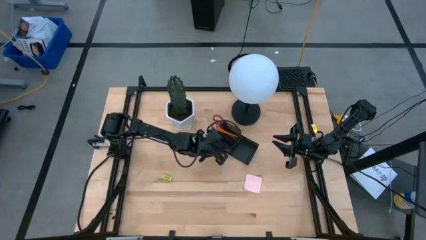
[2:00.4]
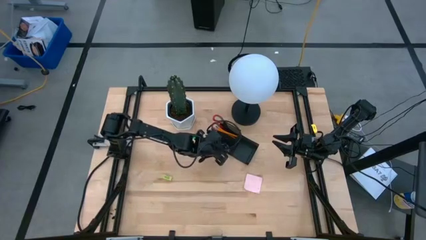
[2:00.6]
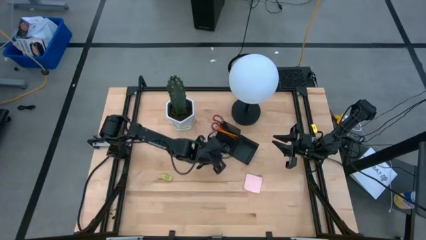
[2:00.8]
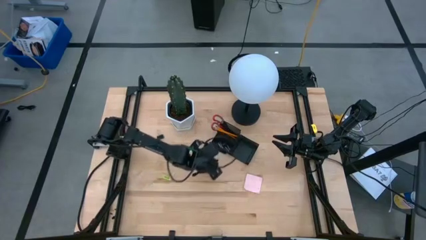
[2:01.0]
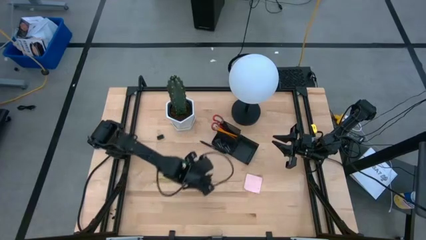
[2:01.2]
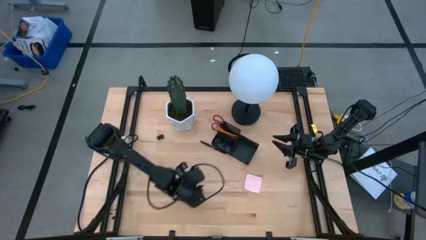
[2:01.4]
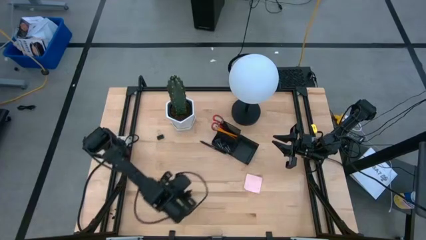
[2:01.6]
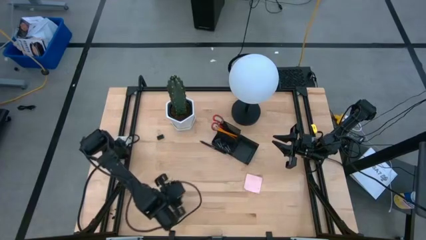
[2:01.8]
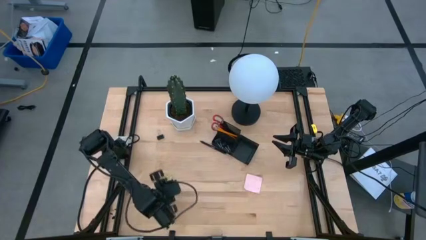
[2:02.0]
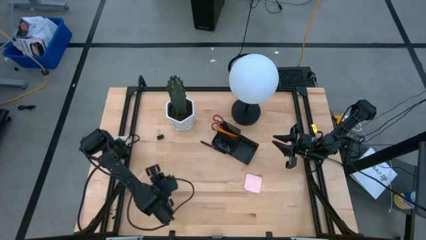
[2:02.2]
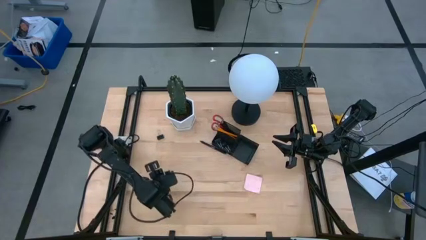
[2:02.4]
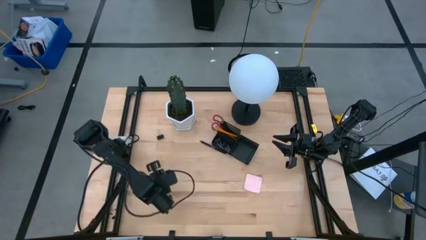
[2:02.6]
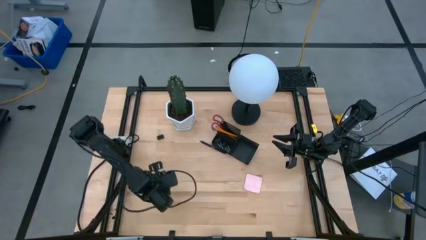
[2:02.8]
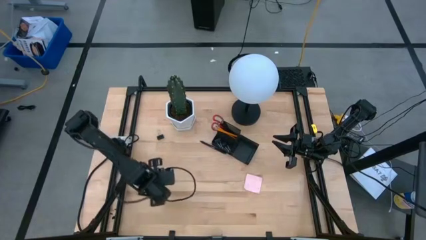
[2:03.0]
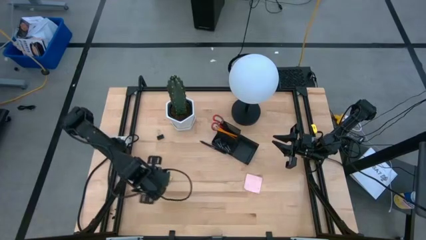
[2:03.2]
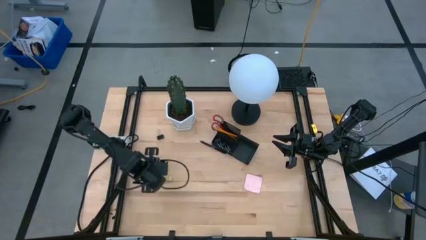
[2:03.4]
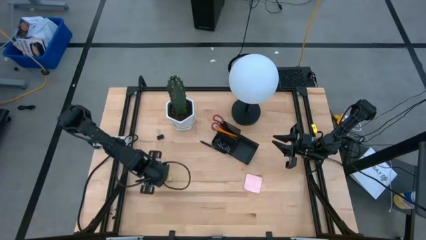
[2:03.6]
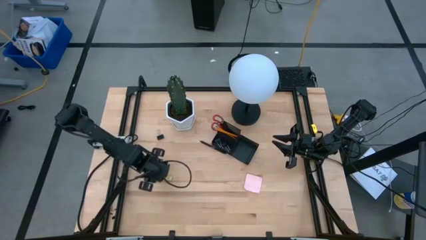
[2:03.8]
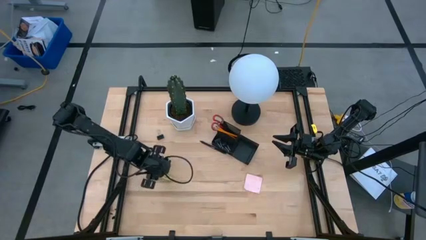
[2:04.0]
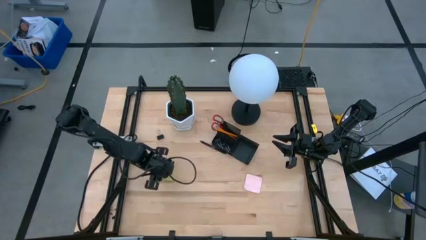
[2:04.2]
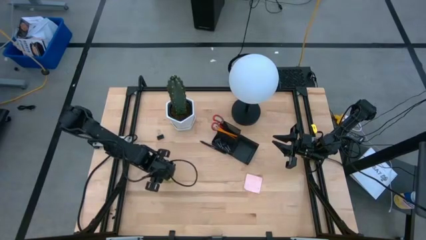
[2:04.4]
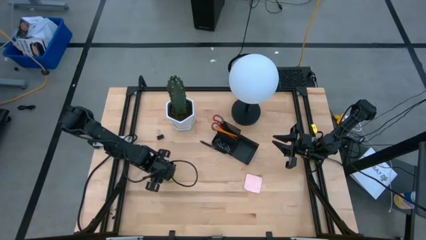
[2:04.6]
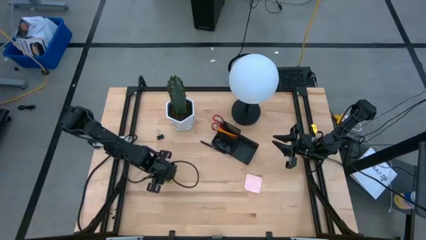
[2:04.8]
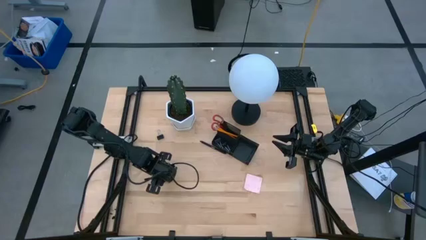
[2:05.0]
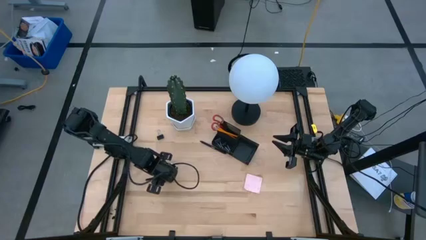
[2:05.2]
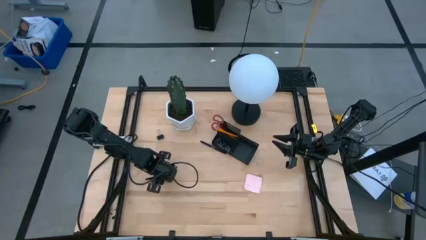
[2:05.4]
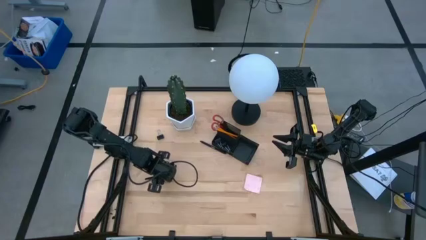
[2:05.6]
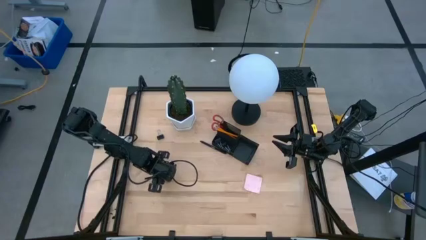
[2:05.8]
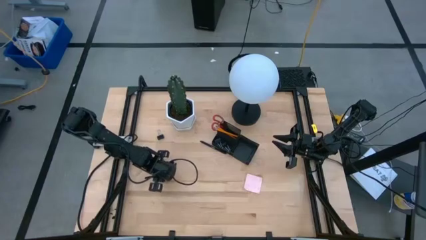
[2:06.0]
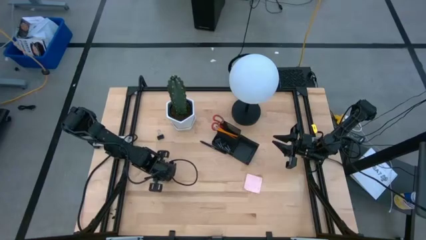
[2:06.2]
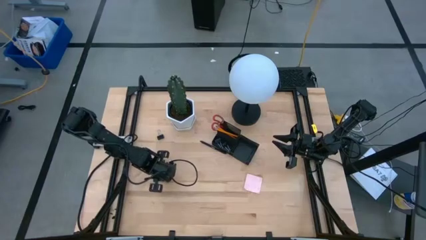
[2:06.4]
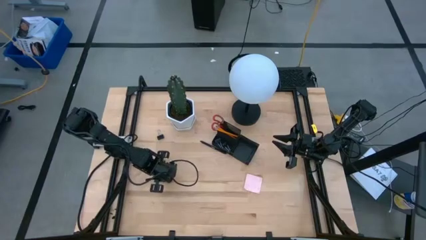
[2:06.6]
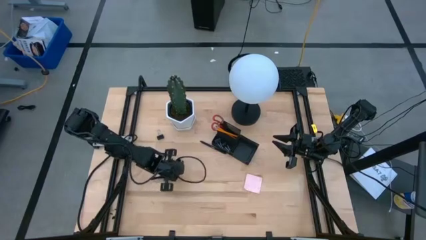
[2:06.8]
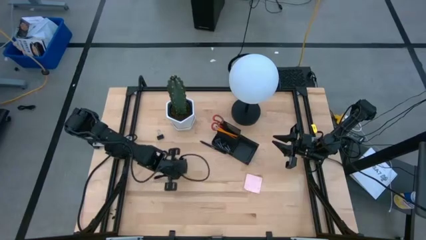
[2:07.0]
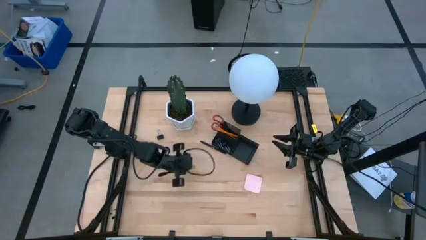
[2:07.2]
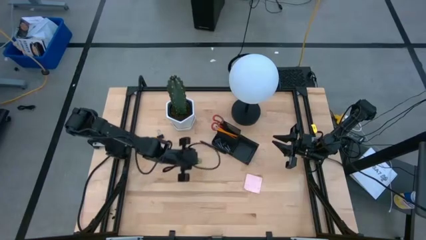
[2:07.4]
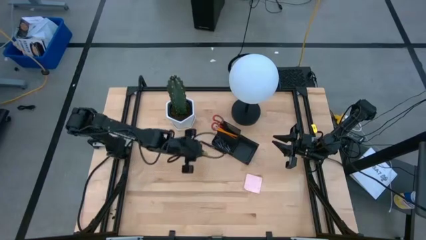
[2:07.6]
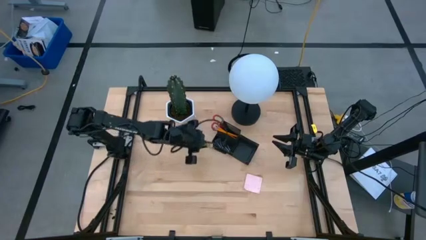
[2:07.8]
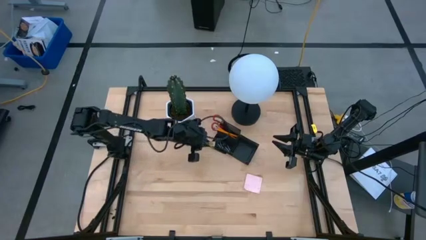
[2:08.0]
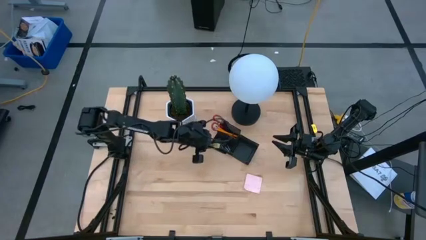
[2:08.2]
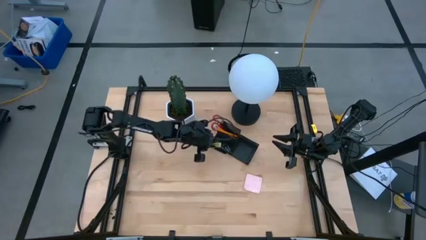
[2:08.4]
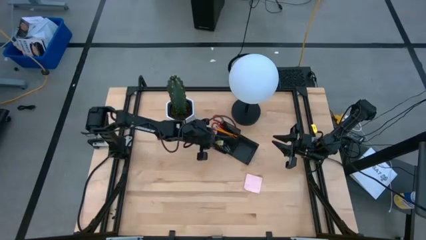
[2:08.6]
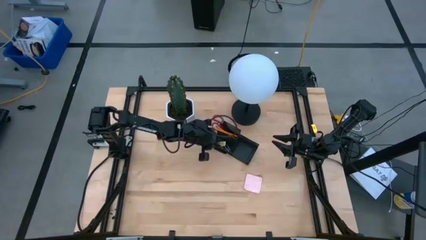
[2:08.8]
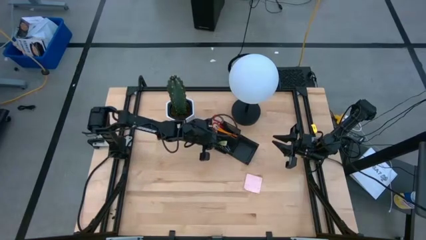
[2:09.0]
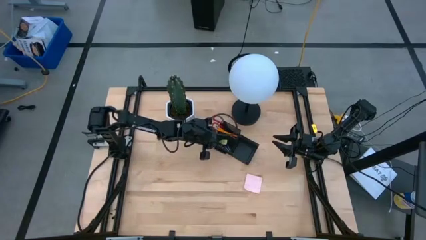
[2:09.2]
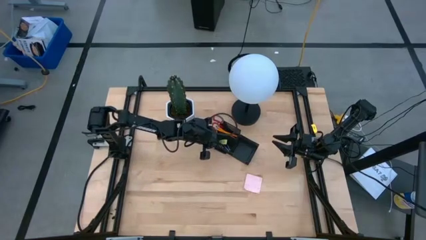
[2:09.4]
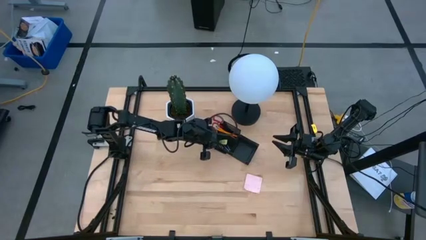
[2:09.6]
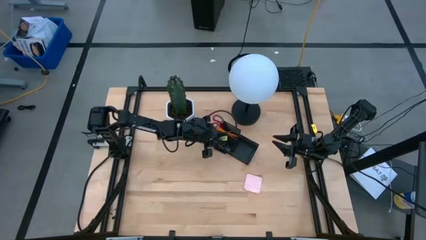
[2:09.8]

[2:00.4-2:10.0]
Task: Pick and place office supplies into organizer
Put the light green eraser into the black desk organizer

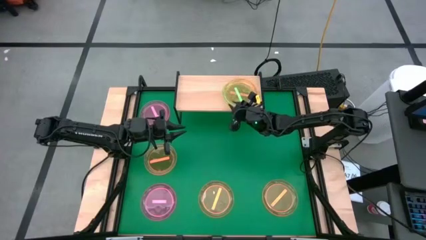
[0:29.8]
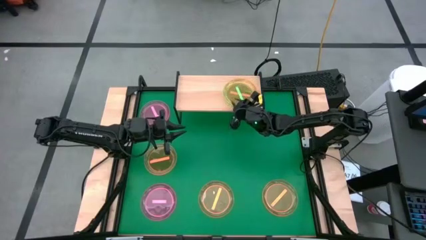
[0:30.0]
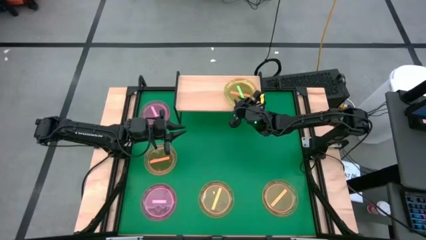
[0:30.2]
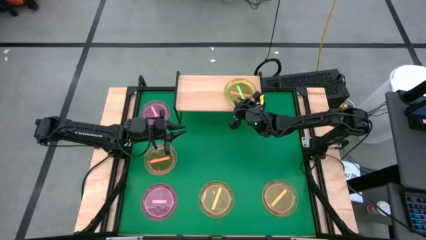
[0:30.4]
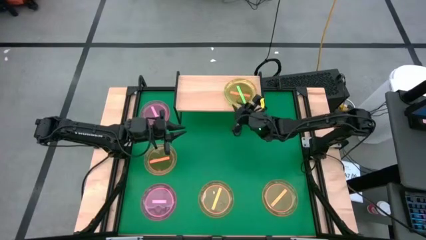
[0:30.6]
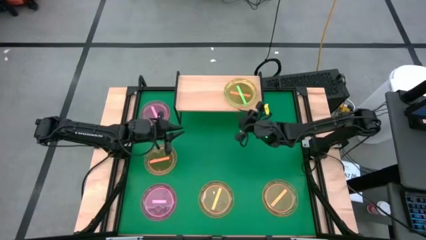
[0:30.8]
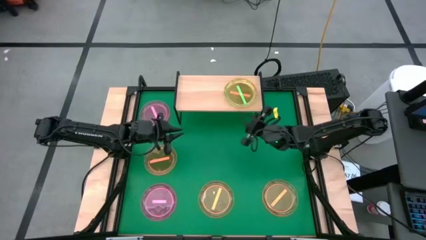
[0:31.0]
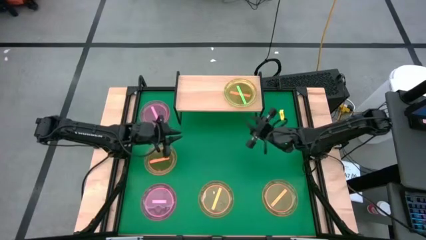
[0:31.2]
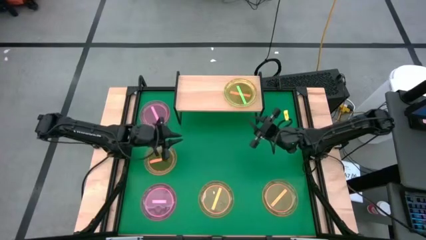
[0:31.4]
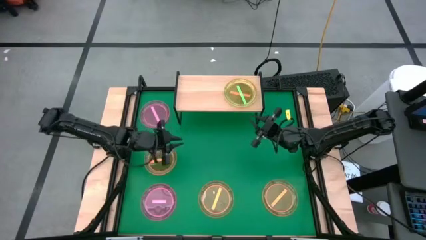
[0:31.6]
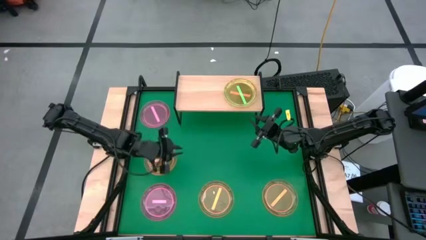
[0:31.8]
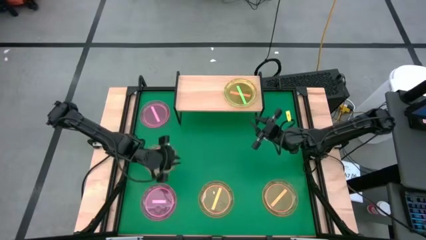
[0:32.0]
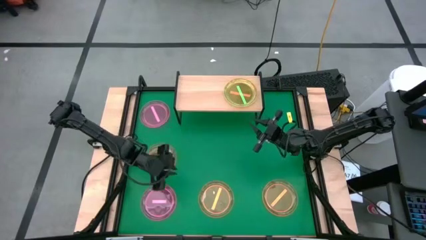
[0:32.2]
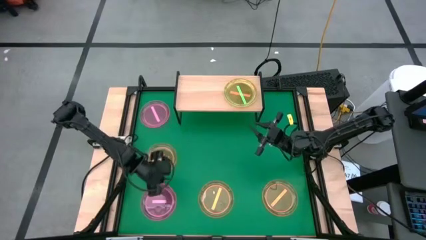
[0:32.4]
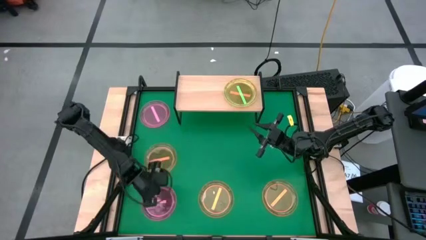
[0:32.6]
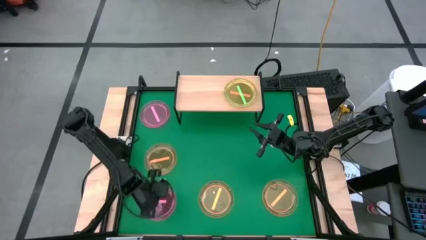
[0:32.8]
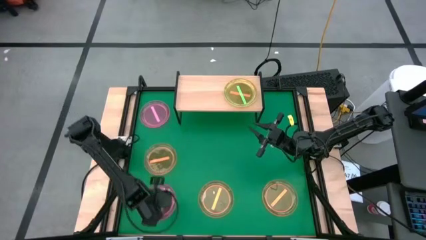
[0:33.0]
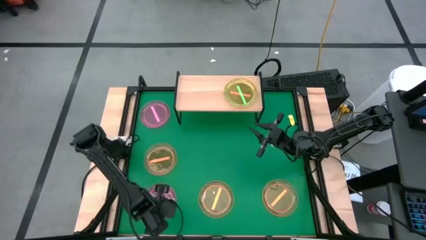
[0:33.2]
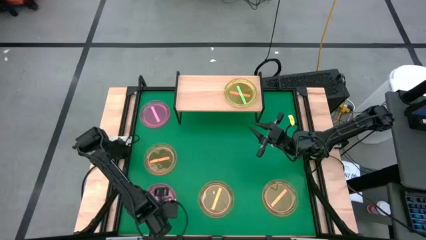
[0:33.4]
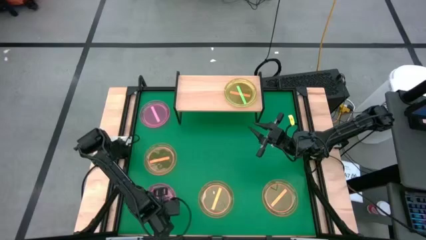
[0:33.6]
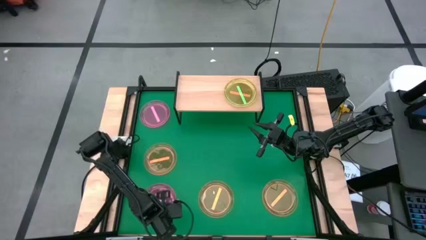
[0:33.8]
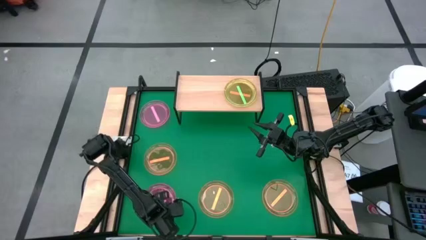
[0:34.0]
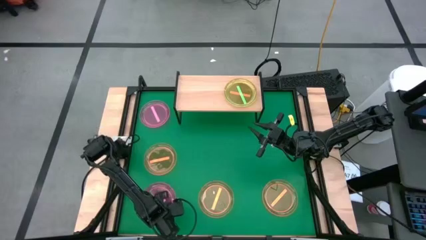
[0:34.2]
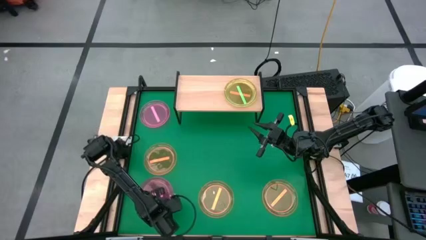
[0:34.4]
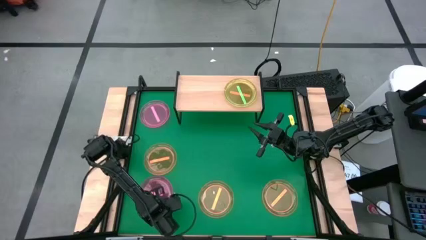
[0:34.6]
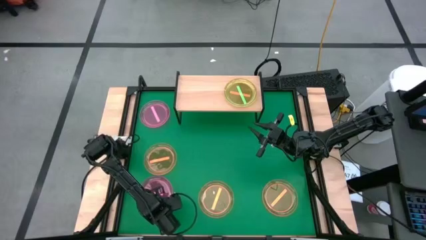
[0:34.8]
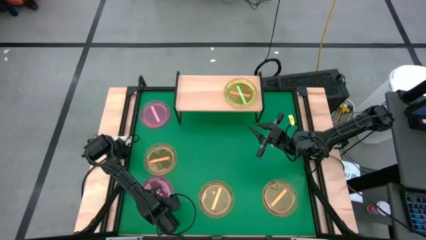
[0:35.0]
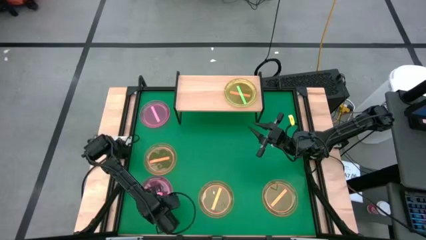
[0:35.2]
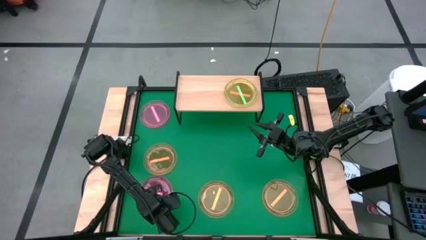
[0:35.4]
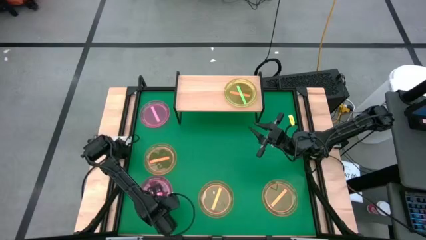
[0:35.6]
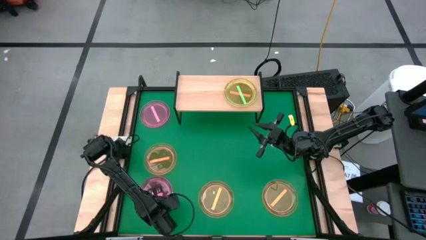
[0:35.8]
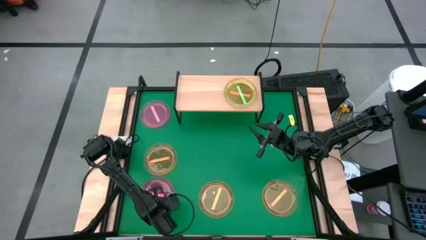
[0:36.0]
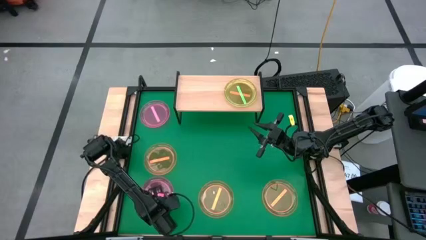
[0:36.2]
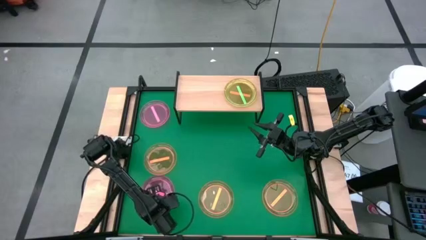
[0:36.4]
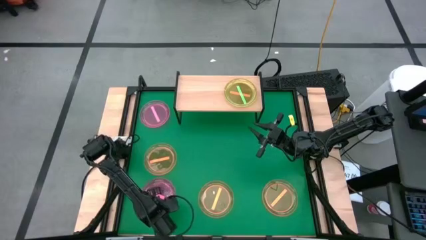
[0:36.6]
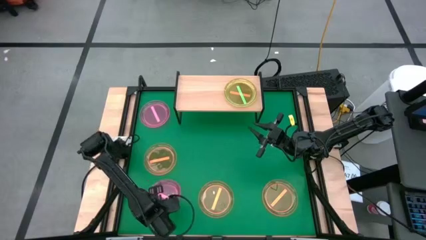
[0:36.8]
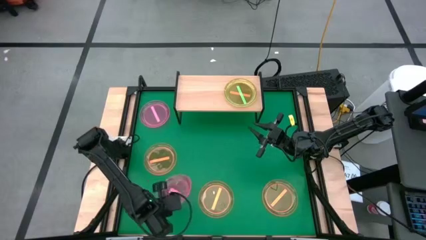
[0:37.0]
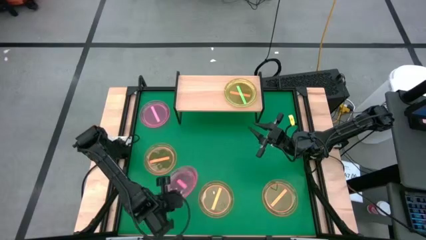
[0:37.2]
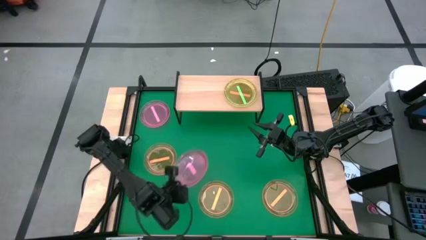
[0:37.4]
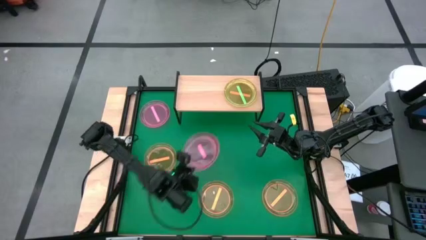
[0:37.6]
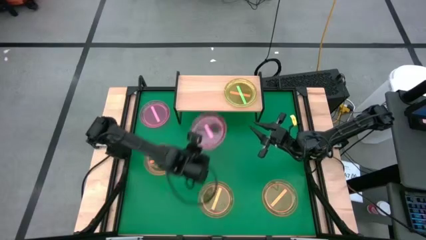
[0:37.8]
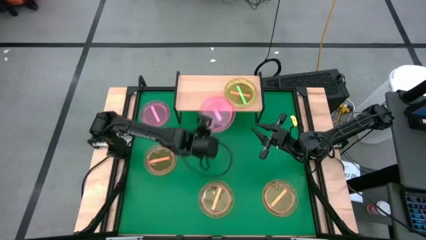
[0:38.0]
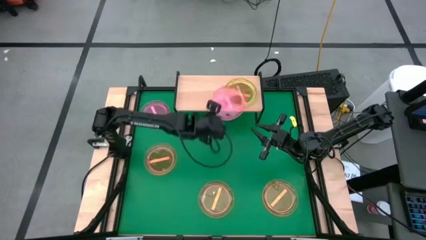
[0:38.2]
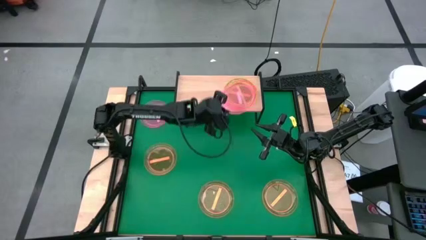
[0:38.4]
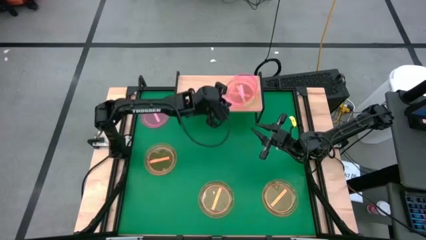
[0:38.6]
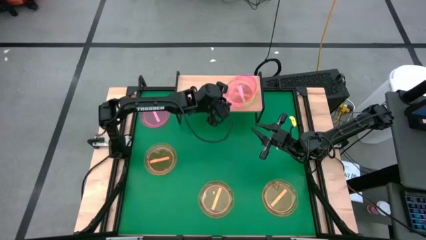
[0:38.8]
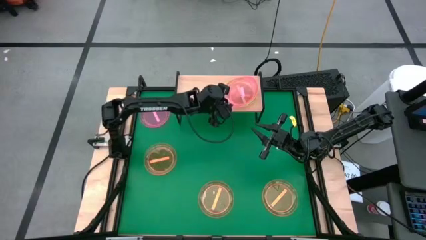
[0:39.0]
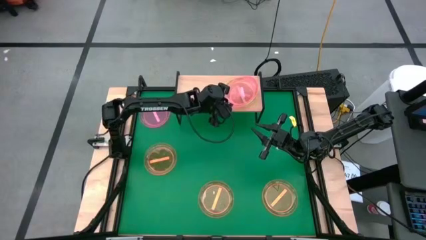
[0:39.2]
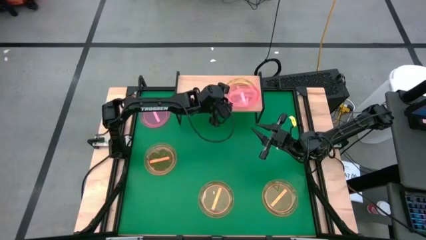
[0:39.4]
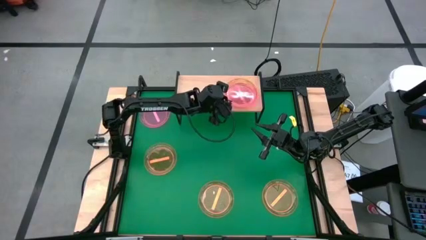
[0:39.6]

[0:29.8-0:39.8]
Task: Place and stack plates onto a shelf
Stack the pink plate on top of the green plate on the shelf
